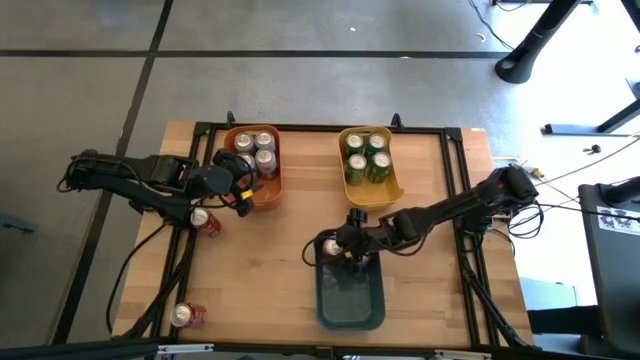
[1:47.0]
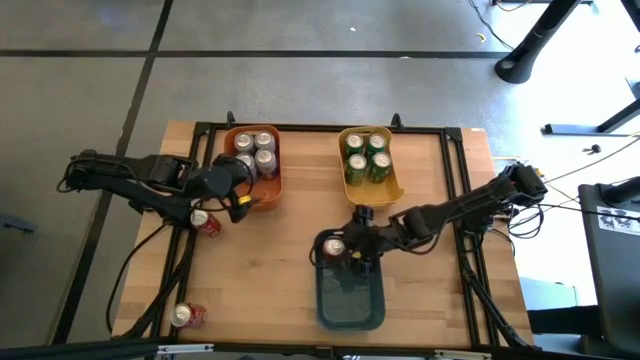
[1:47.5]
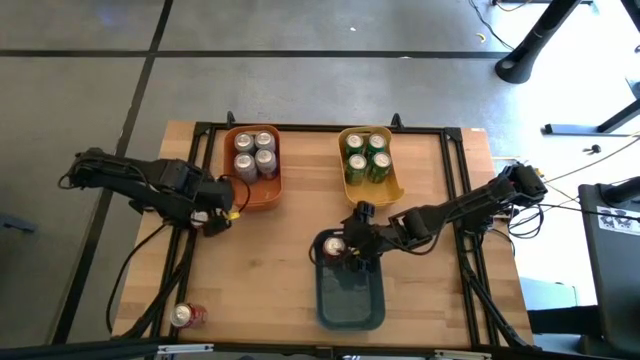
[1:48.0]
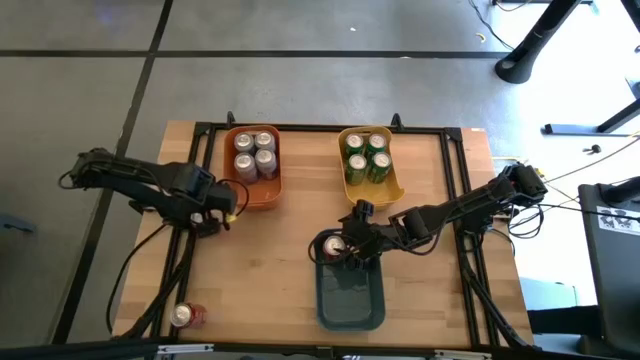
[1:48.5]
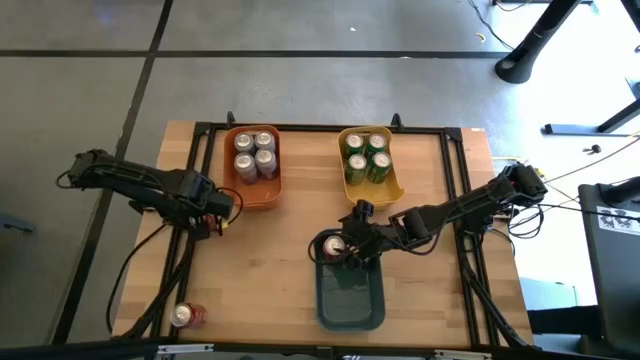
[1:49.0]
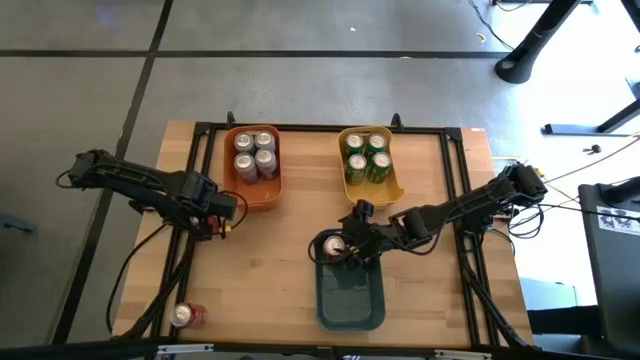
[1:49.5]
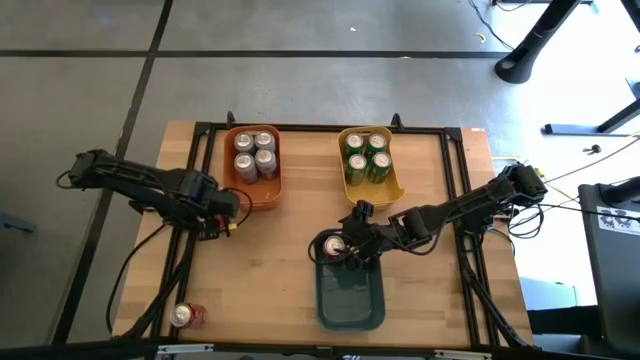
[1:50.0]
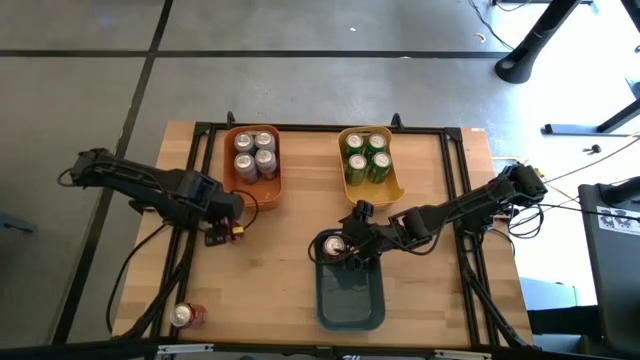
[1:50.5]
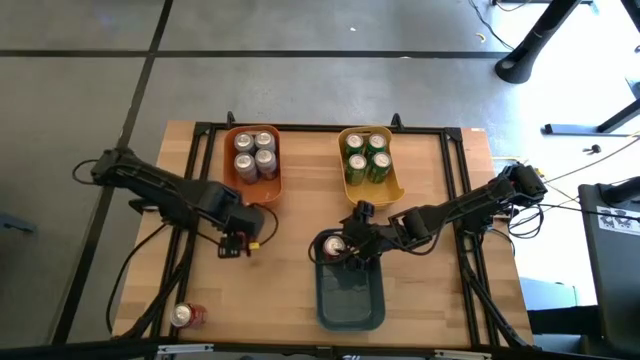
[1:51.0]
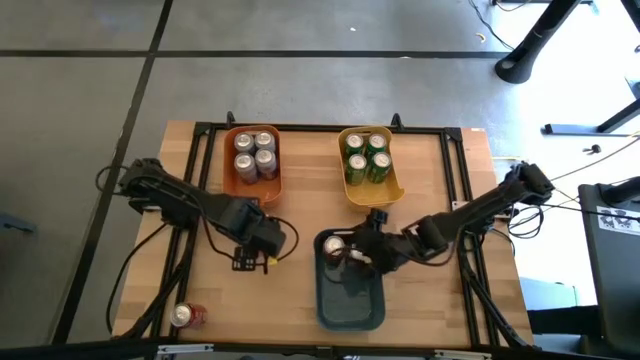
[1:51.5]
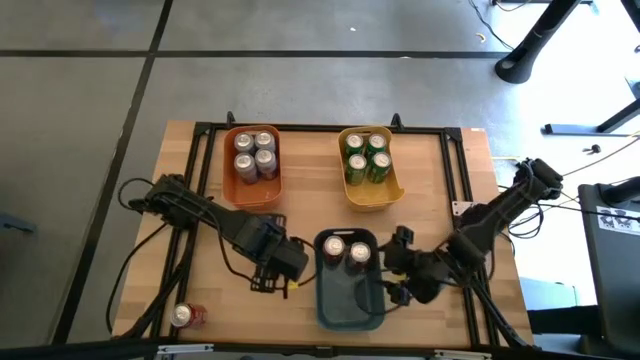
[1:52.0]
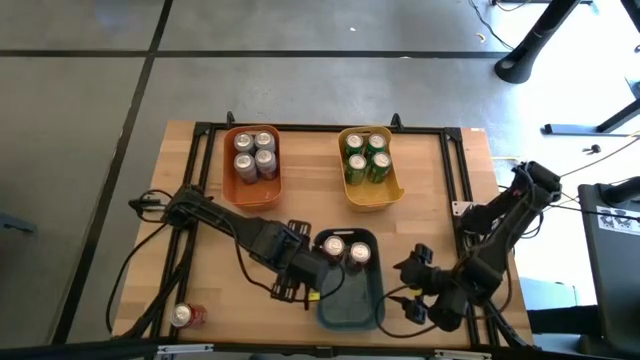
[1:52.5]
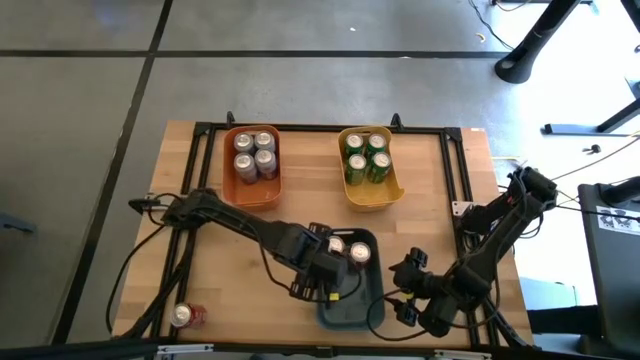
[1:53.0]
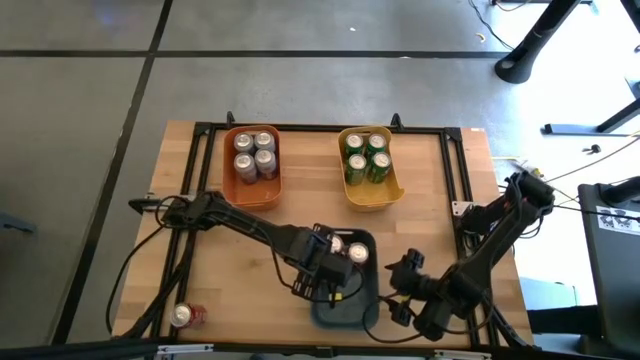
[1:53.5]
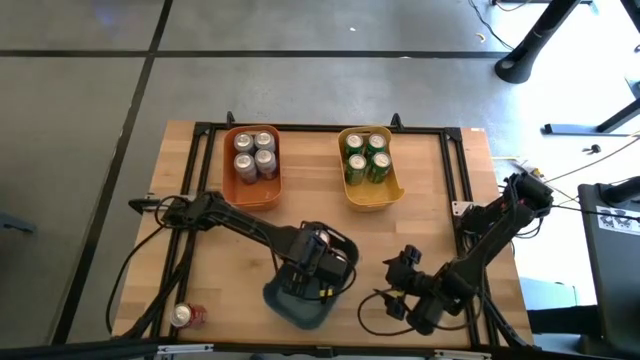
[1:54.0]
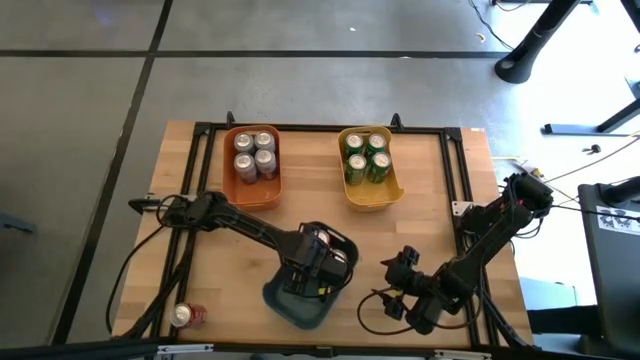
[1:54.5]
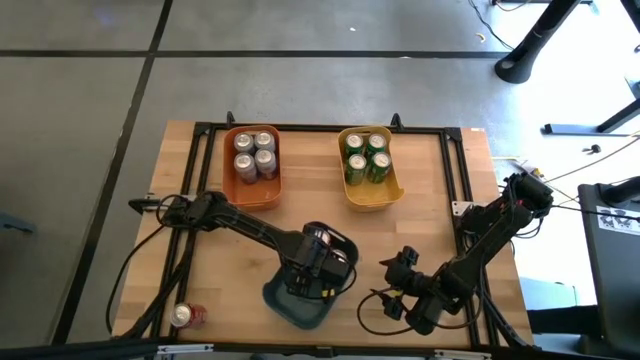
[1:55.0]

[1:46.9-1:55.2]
Task: Sort soda cans
Put the red soda can into the blue bin

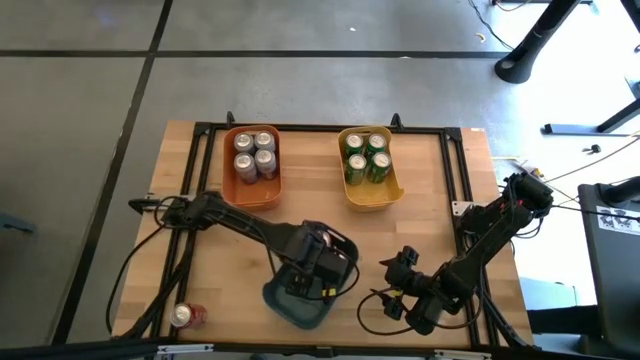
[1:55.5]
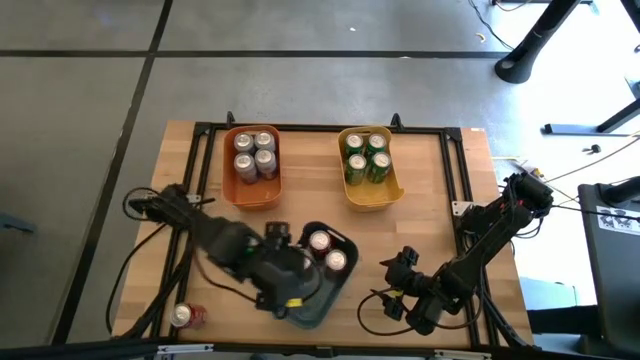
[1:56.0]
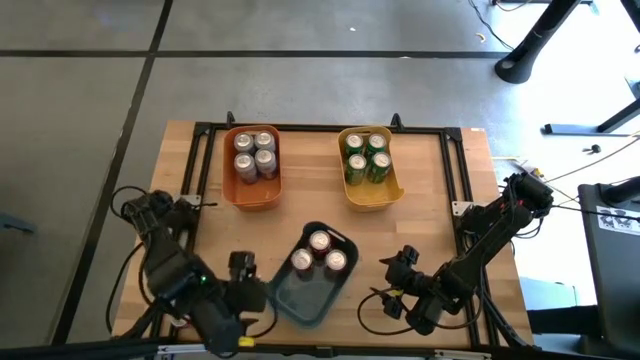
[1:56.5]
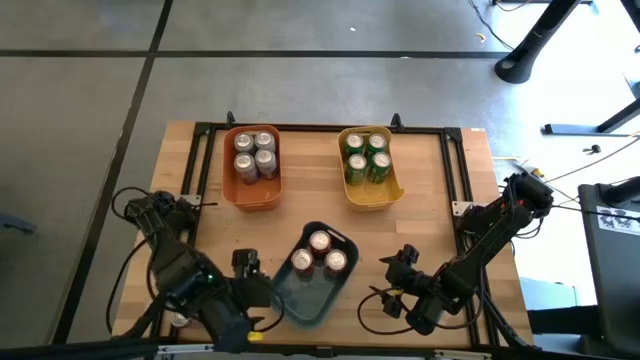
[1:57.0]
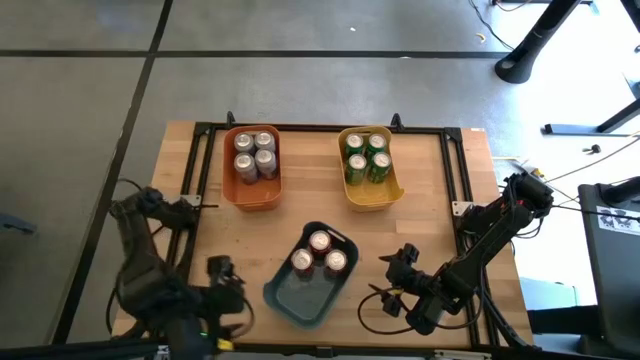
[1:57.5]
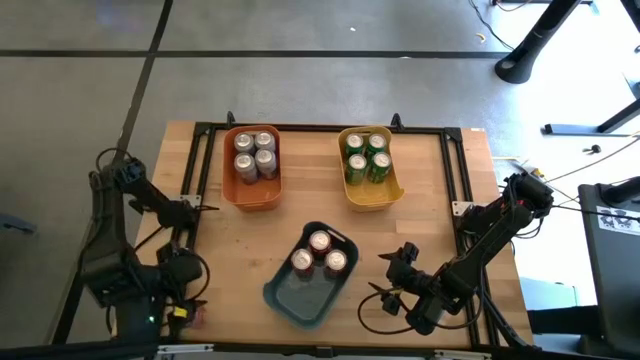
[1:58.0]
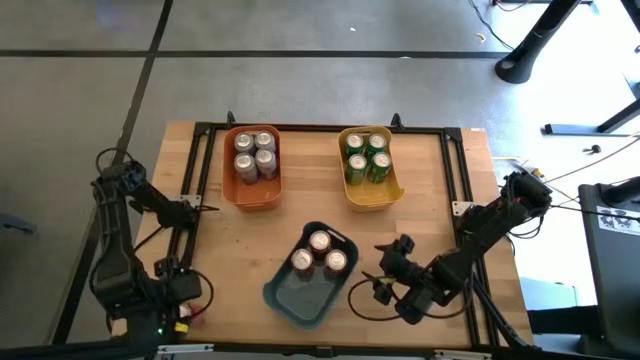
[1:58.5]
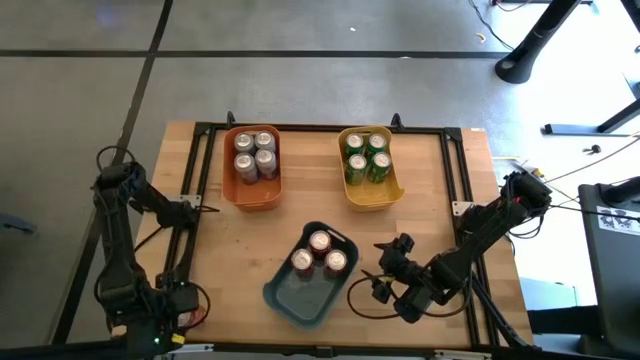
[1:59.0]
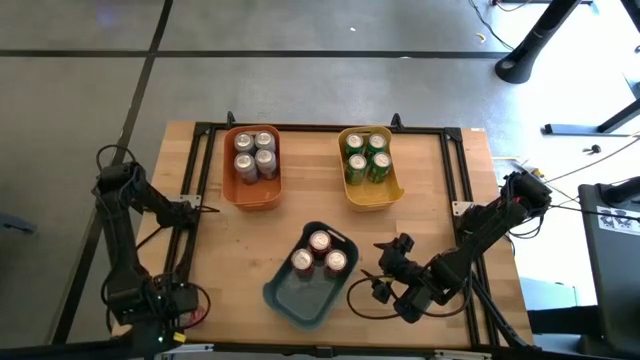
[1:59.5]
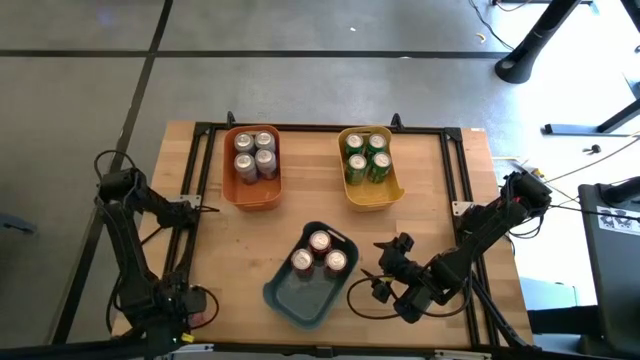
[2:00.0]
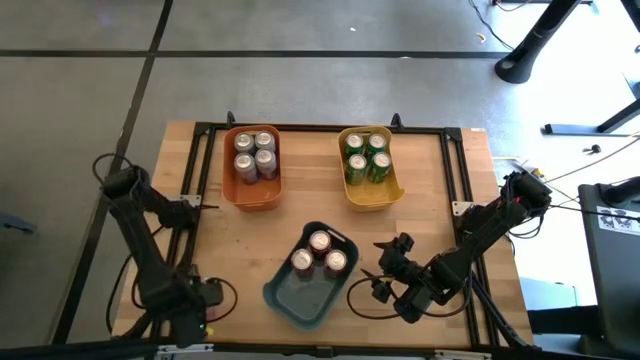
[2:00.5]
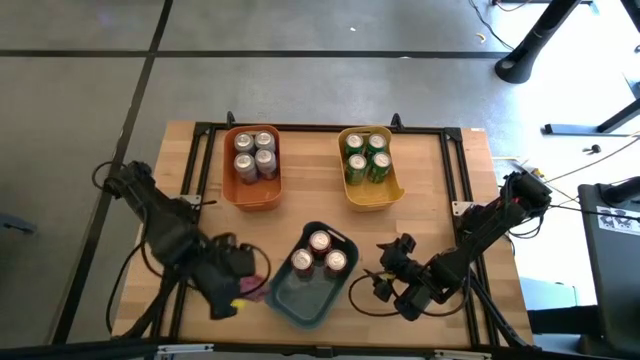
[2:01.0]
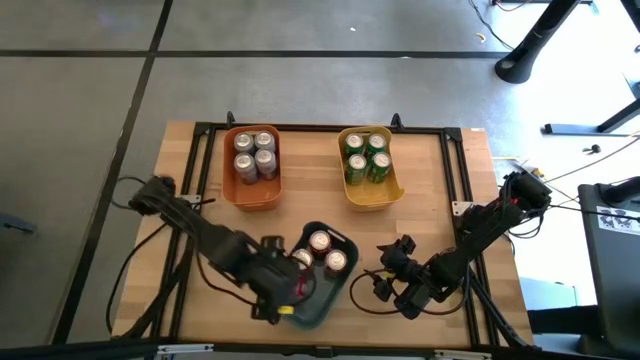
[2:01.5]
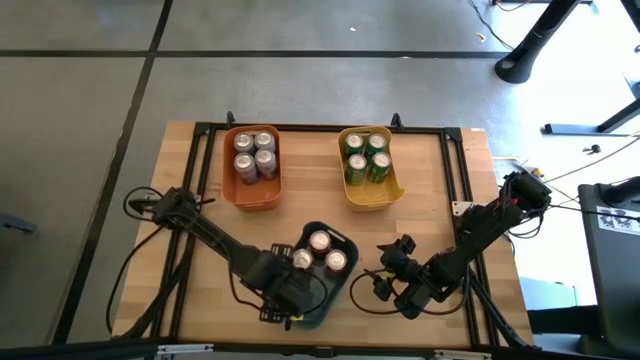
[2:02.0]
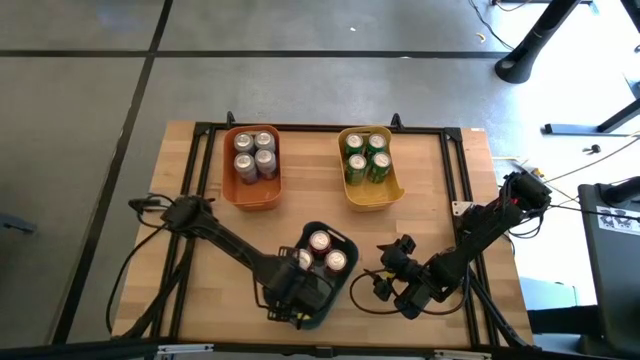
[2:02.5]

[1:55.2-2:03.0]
Put the red soda can into the blue bin

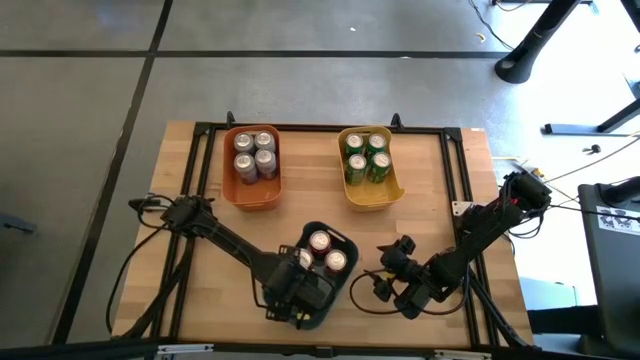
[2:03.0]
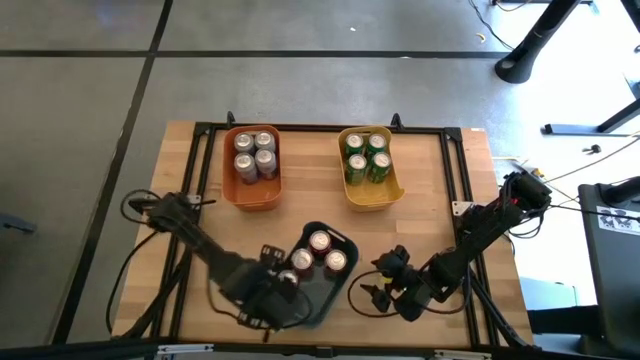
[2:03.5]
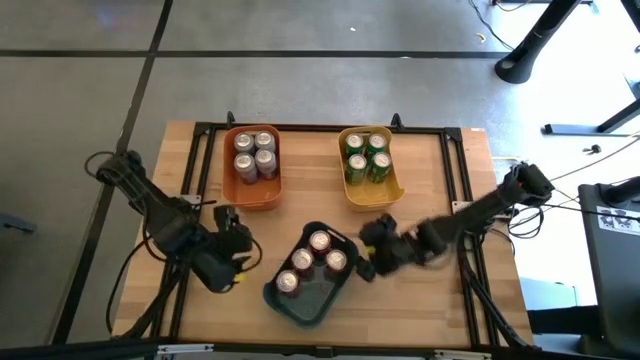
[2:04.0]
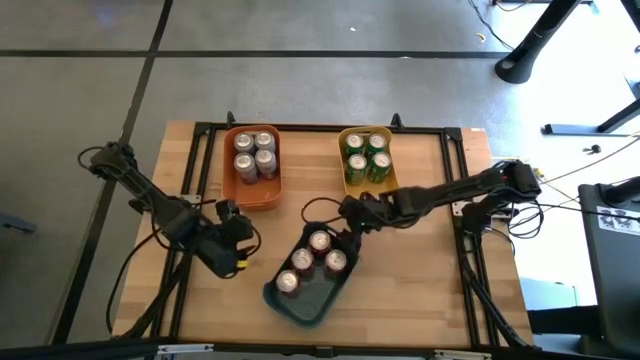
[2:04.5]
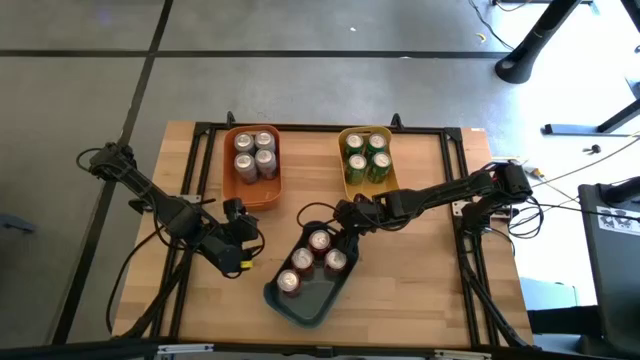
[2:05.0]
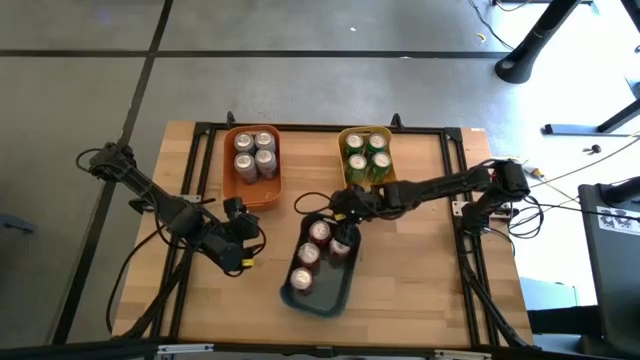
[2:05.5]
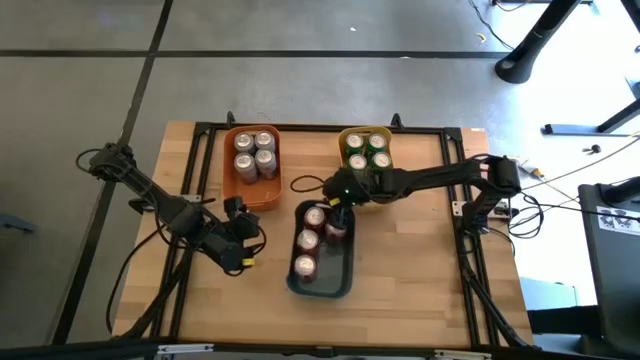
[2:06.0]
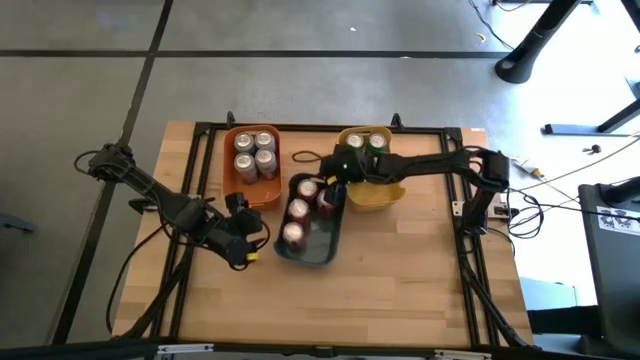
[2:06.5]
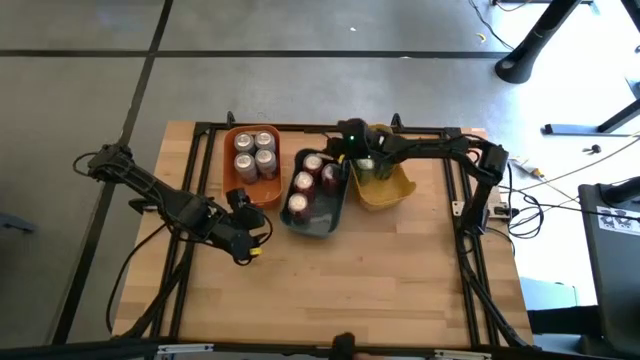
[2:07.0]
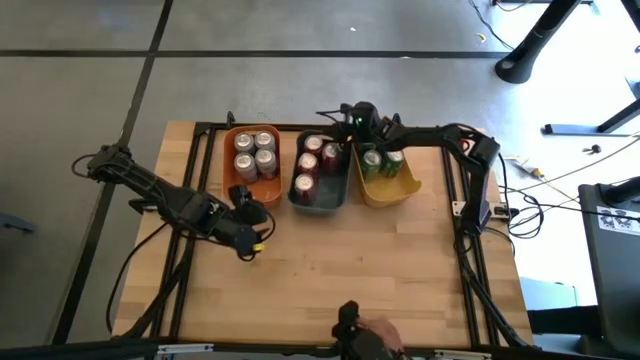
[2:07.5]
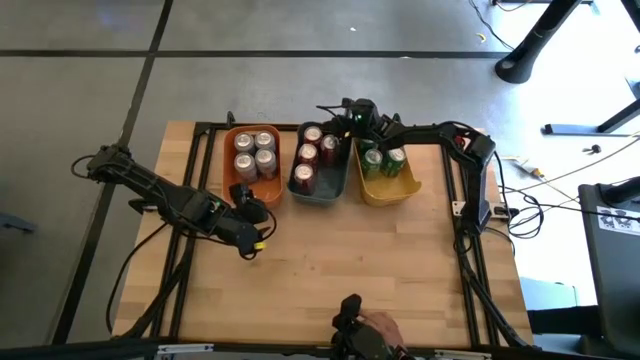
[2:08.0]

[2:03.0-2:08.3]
Move the blue bin to the middle of the orange and yellow bins

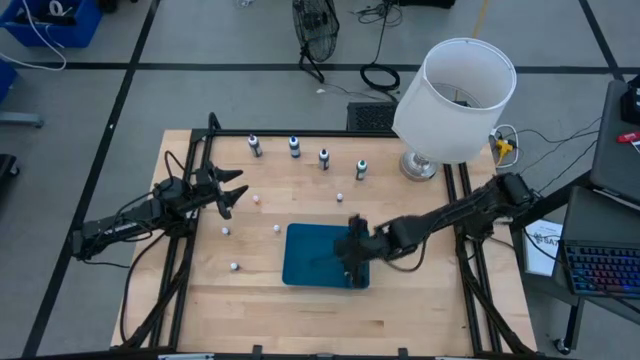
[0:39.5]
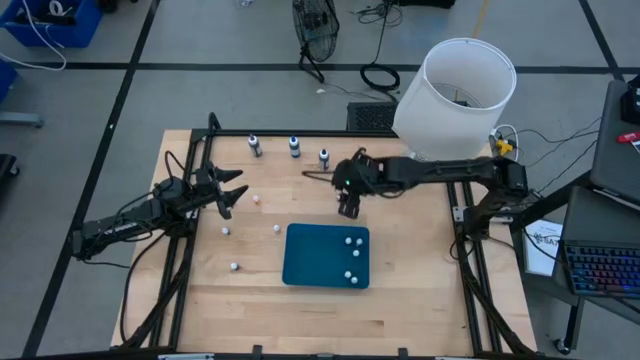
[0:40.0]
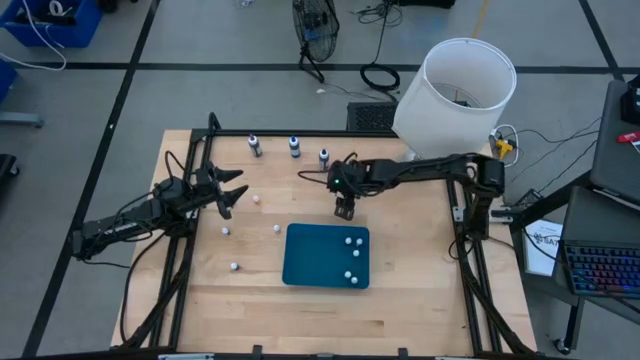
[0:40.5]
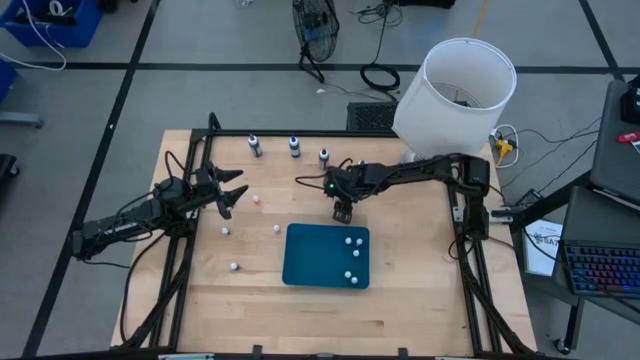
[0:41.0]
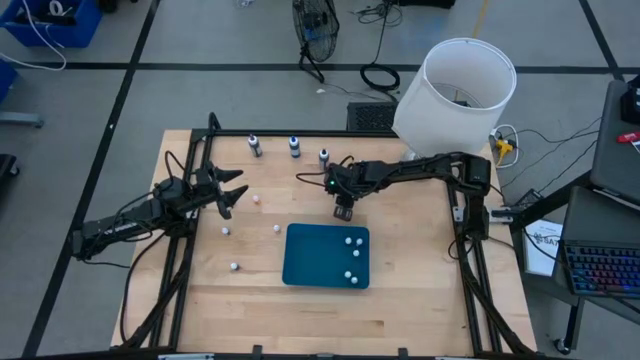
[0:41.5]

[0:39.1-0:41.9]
Task: Pick & Place food coloring
Put the small red food coloring bottle into the blue bin
